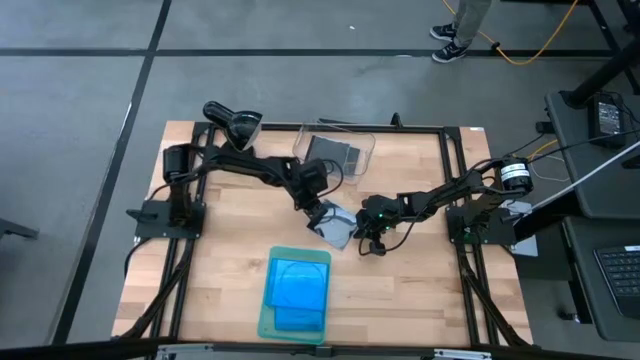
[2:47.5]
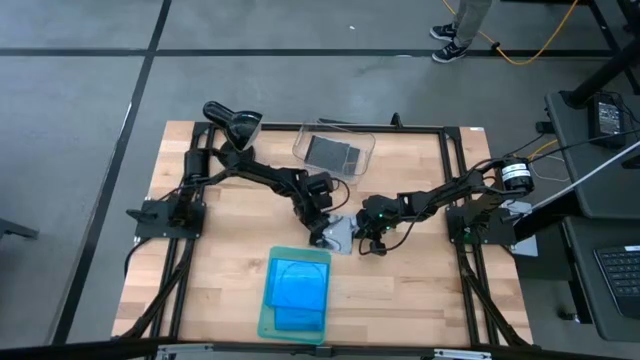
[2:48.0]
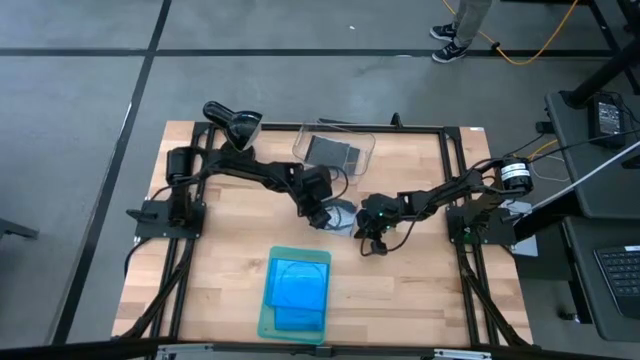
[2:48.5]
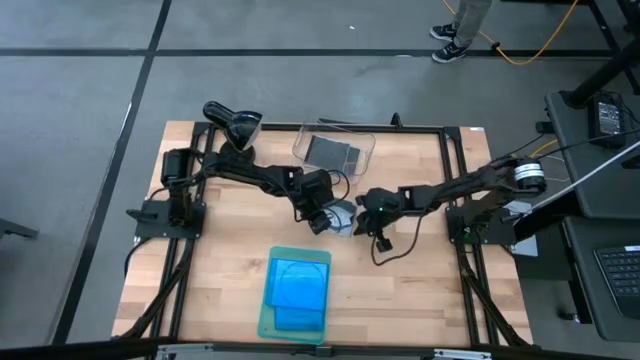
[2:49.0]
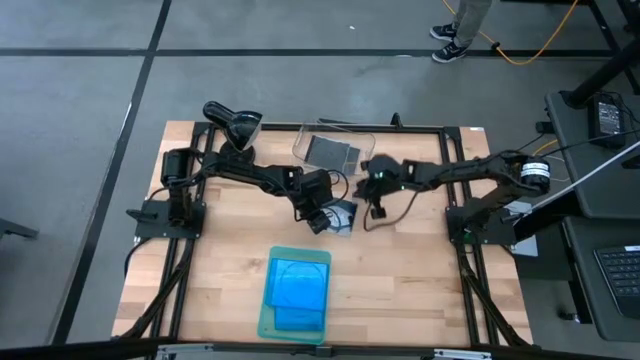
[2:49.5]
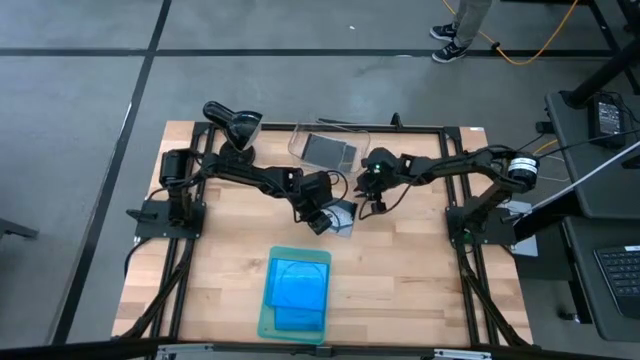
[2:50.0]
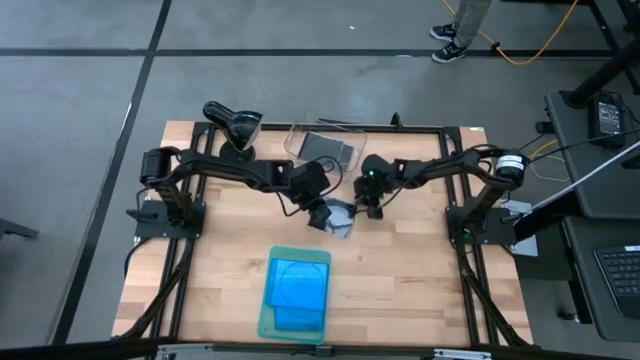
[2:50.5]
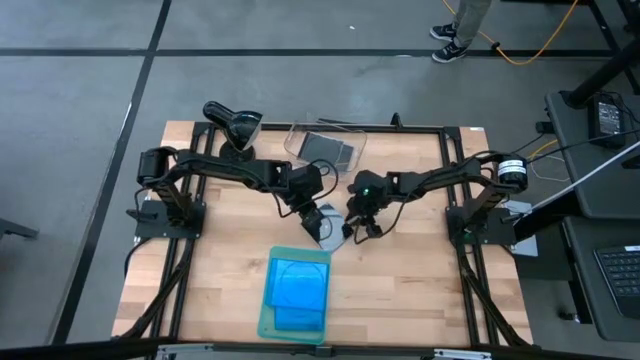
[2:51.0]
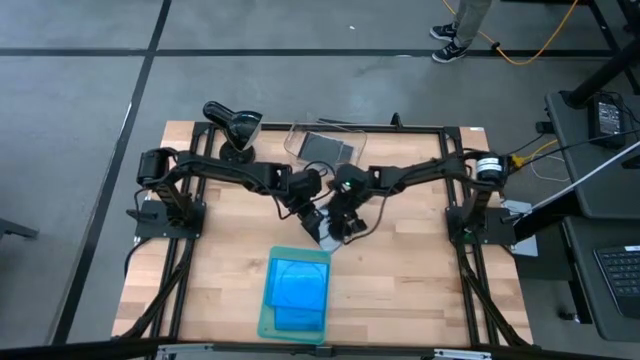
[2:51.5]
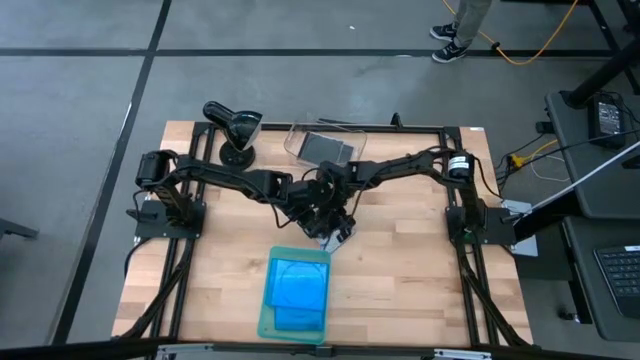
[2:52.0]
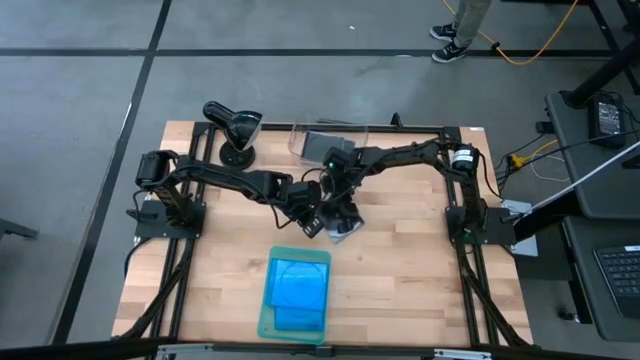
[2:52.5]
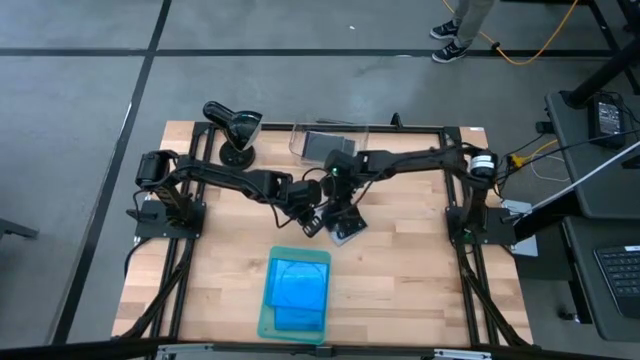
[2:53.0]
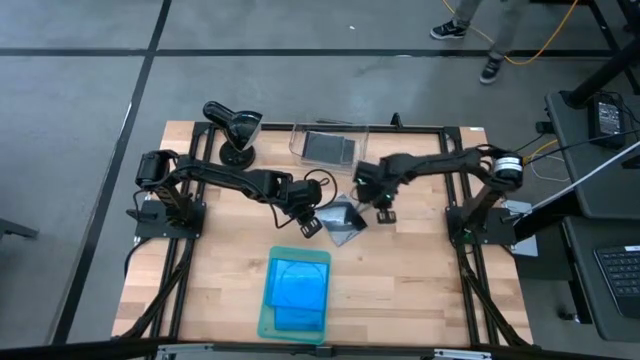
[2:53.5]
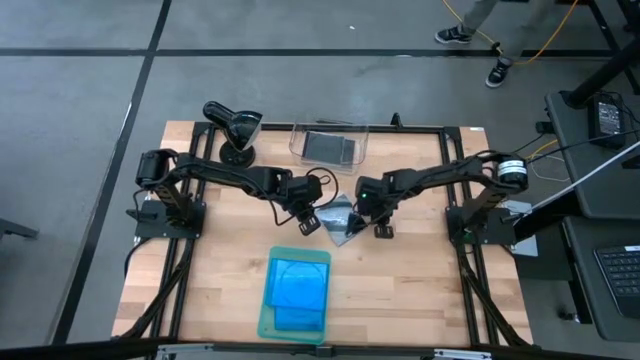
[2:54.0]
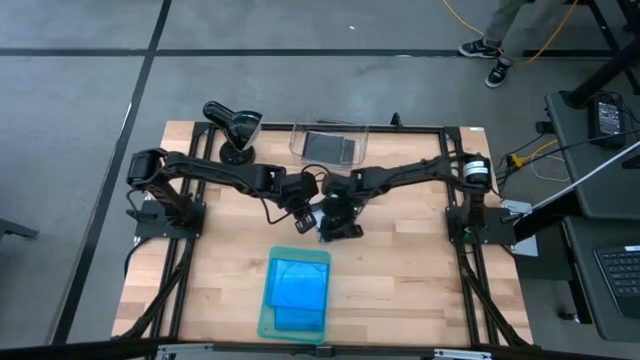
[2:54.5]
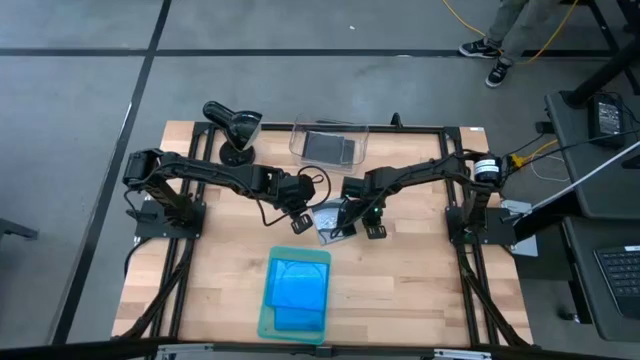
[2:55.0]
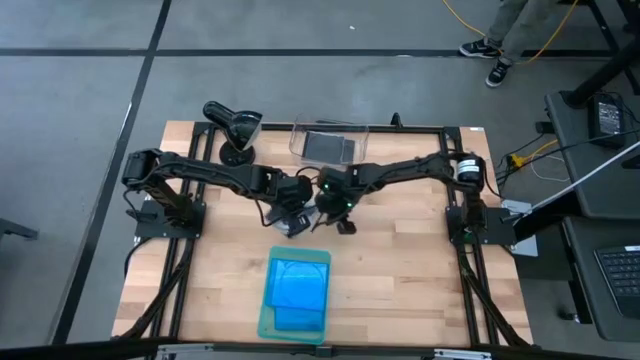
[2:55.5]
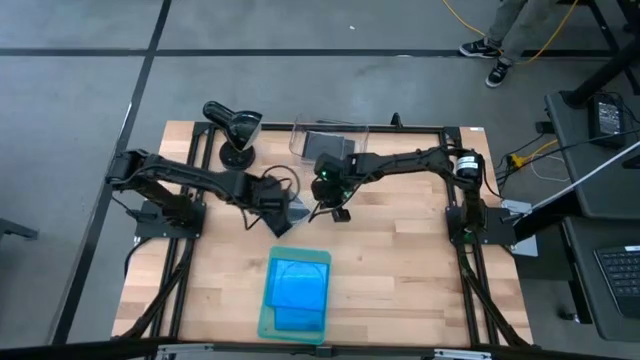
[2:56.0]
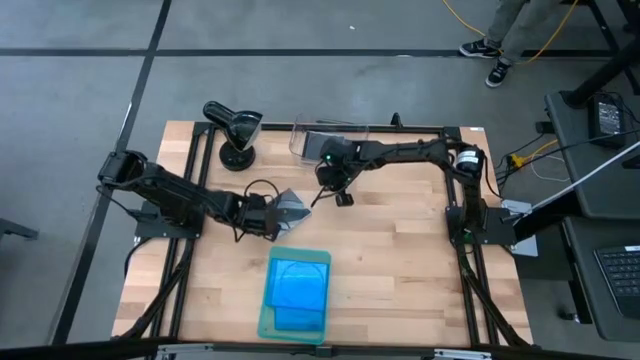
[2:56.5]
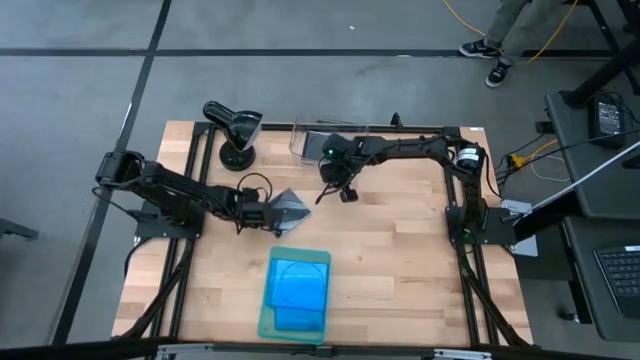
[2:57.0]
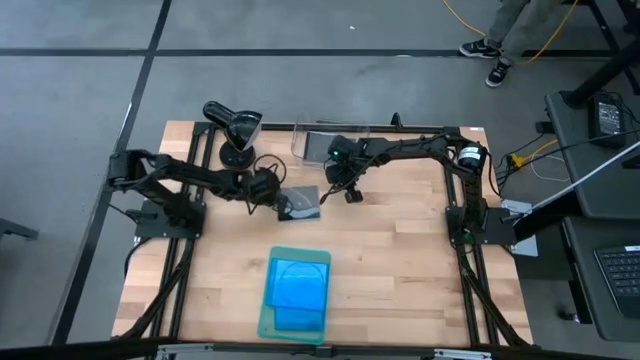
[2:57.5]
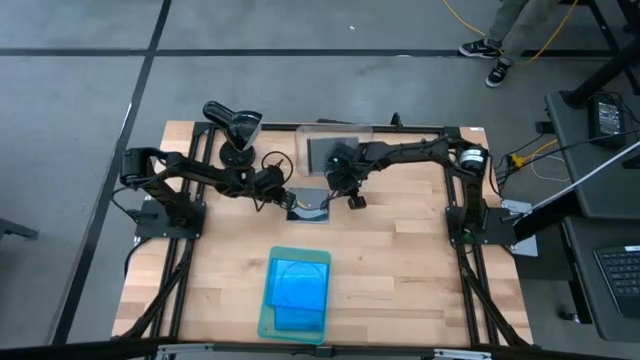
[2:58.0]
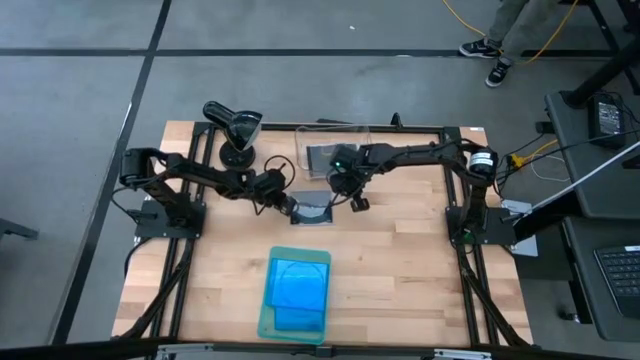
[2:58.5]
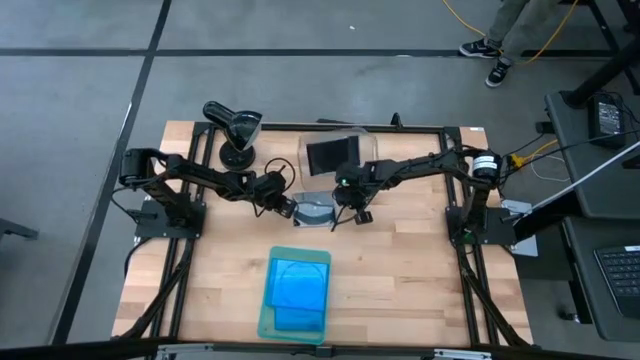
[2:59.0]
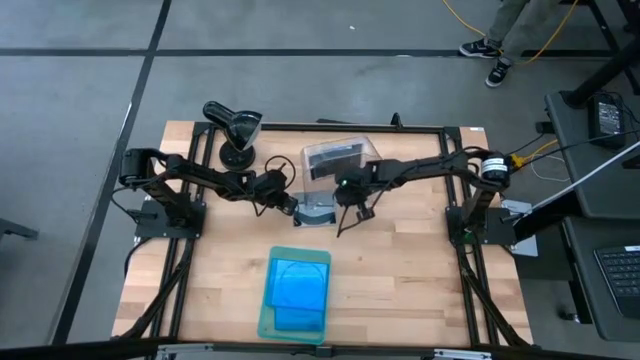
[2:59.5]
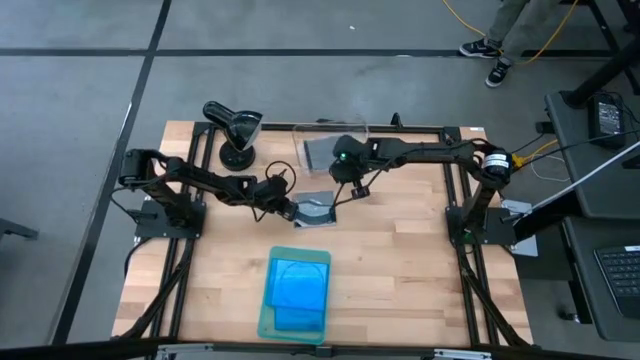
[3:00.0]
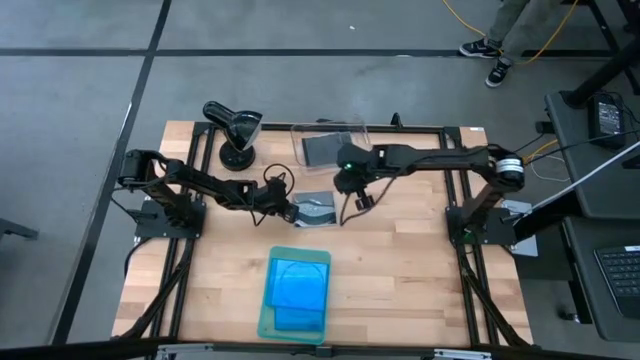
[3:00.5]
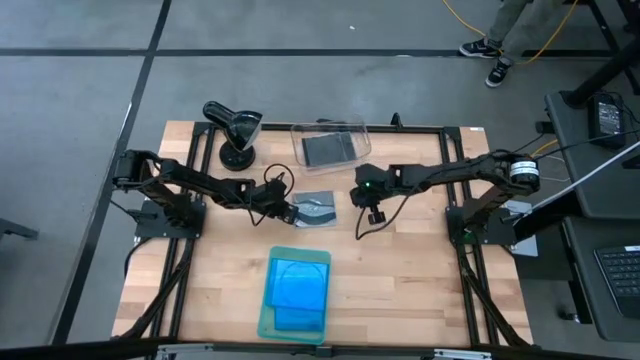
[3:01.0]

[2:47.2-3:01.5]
Task: Pick & place jewel cases by type
Put the black cd case into the transparent bin

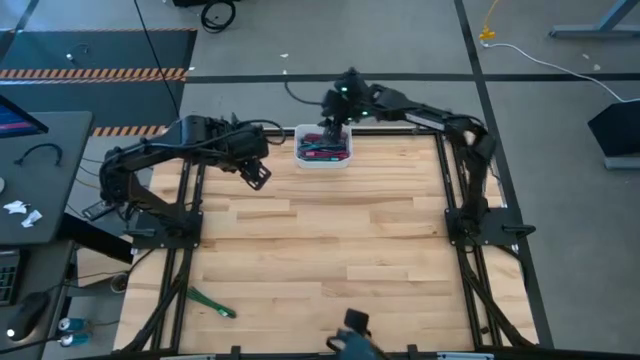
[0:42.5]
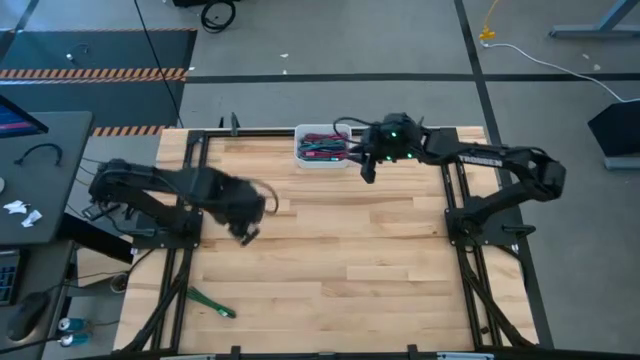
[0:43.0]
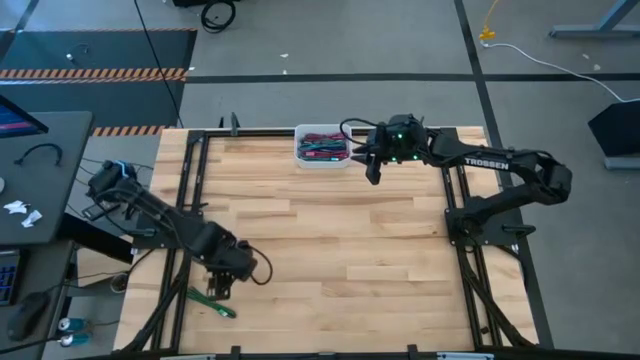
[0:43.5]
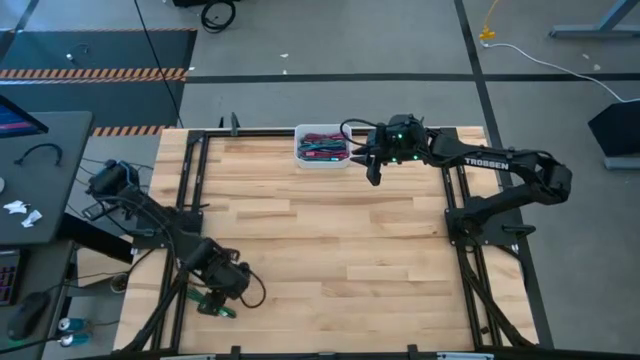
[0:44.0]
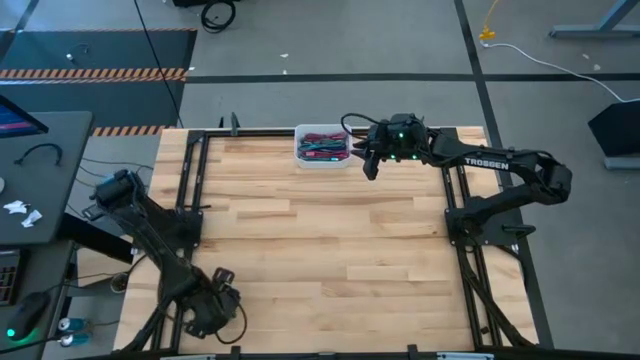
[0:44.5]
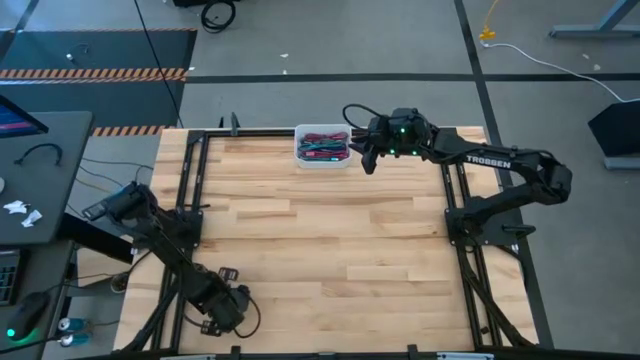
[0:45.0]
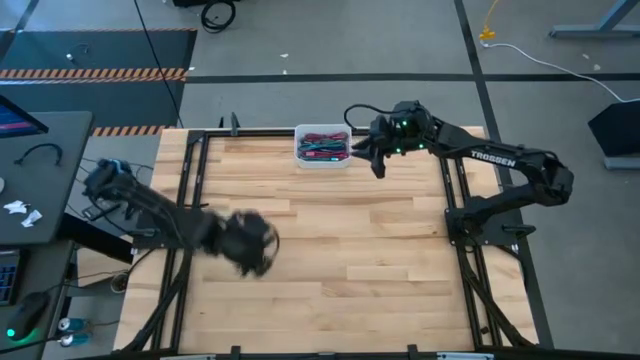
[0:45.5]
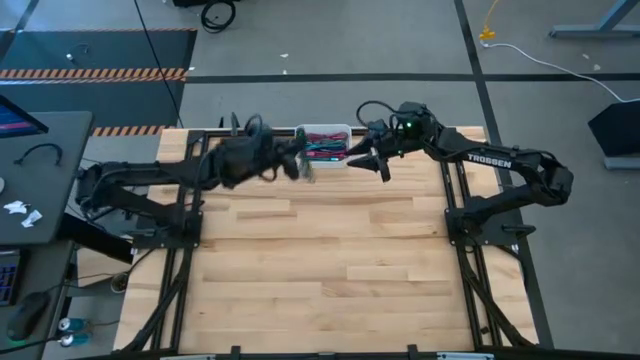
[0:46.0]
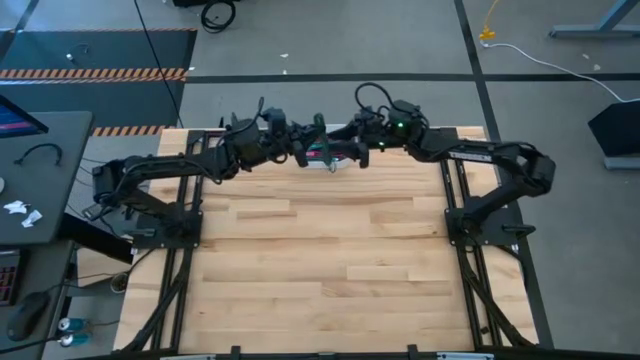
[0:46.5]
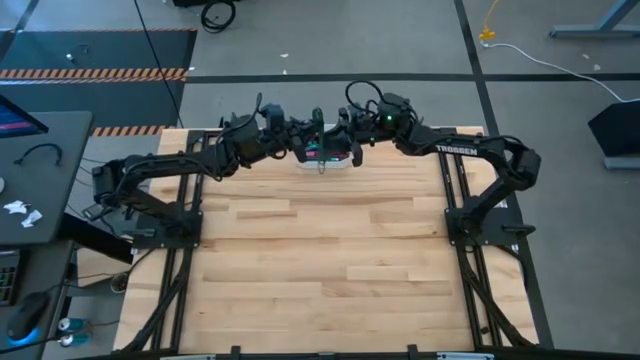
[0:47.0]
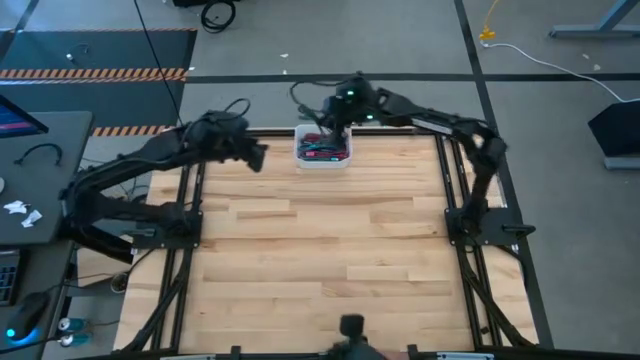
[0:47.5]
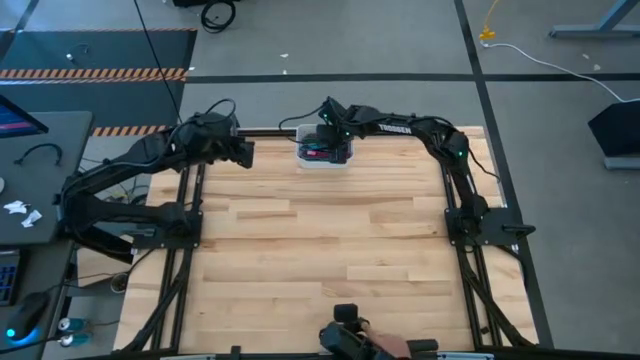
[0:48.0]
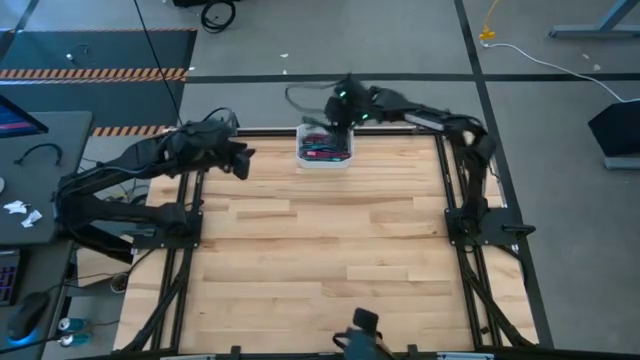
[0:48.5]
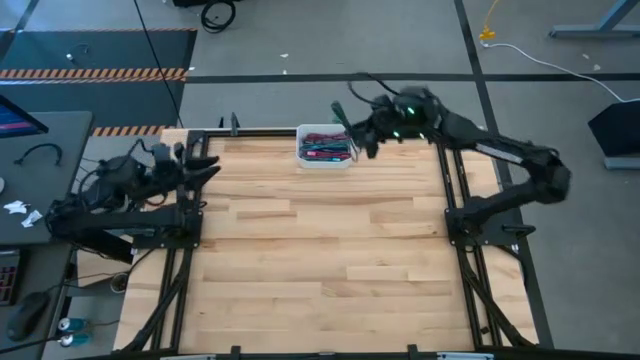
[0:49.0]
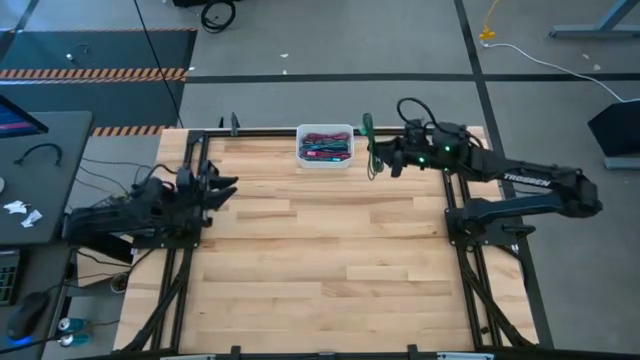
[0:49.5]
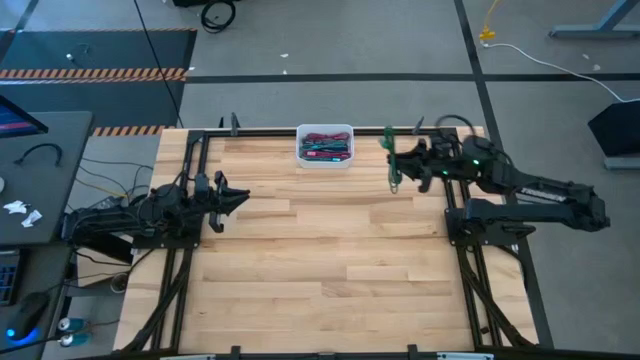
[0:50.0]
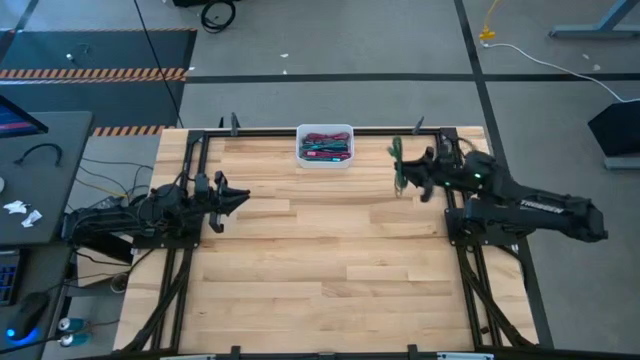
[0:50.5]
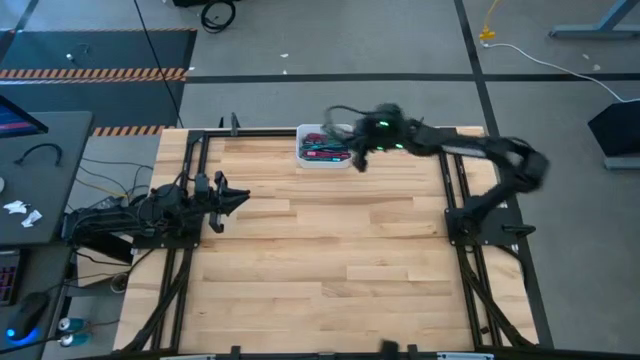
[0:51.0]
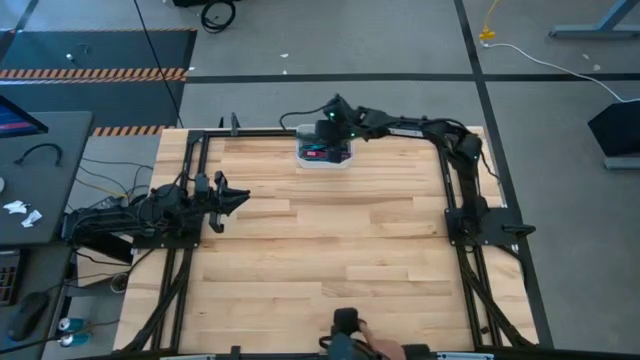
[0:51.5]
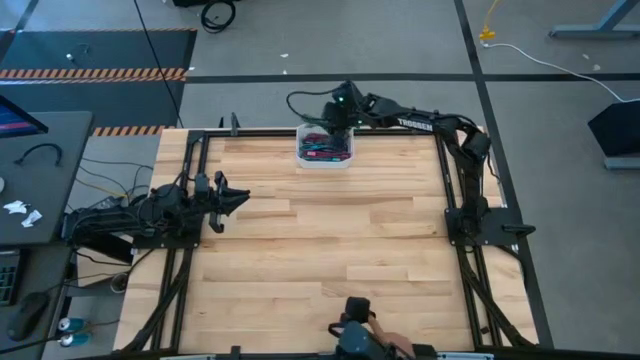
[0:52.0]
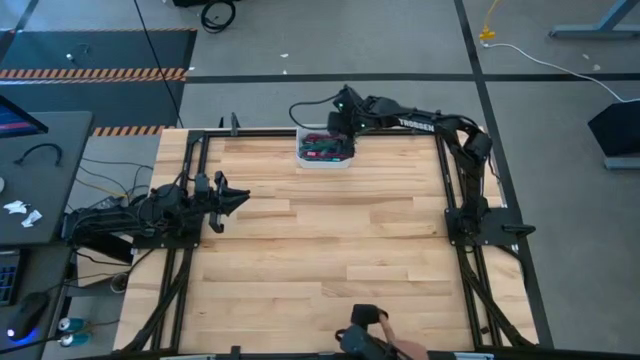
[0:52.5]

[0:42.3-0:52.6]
Task: Pick and place USB-C Cables
Put the green charger cable into the white bin
